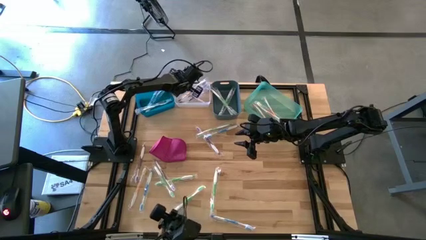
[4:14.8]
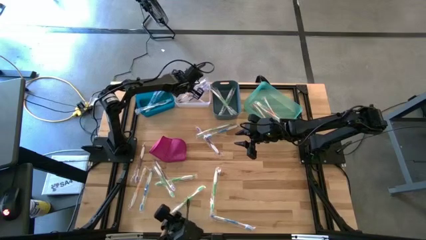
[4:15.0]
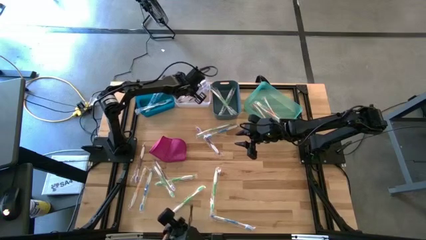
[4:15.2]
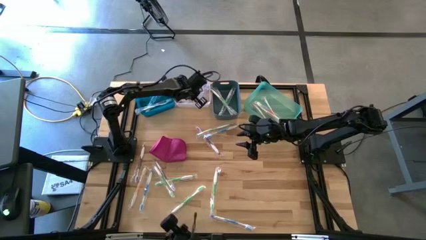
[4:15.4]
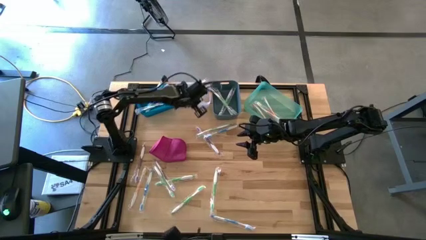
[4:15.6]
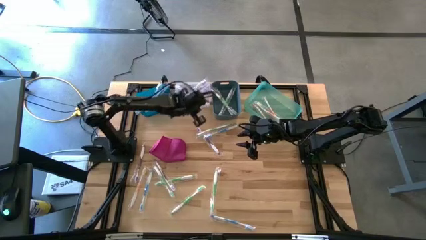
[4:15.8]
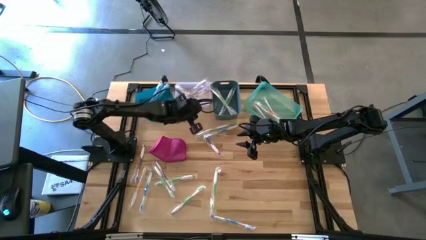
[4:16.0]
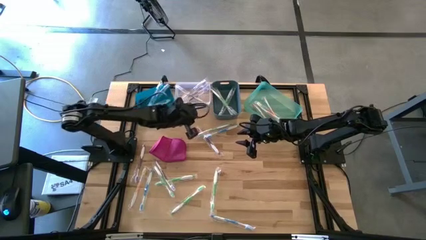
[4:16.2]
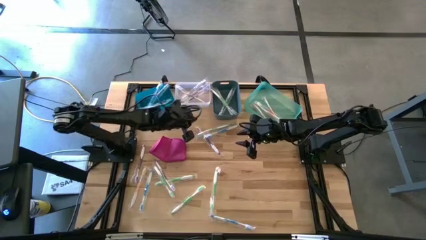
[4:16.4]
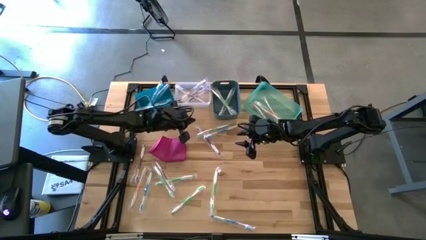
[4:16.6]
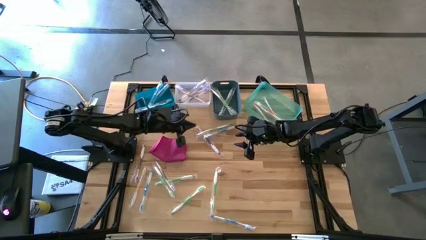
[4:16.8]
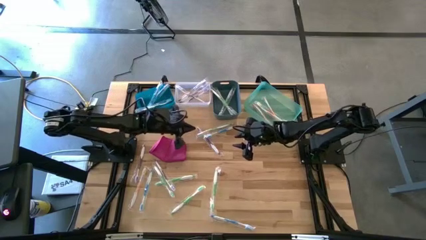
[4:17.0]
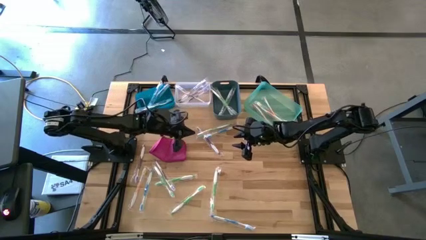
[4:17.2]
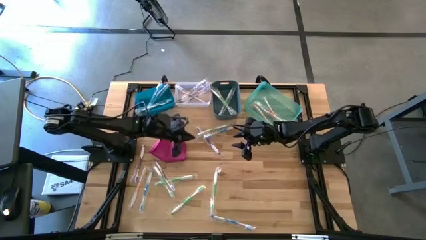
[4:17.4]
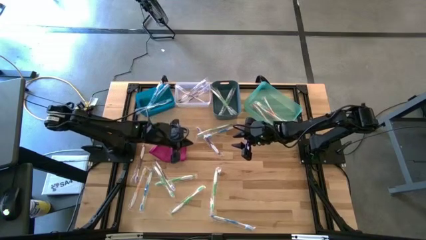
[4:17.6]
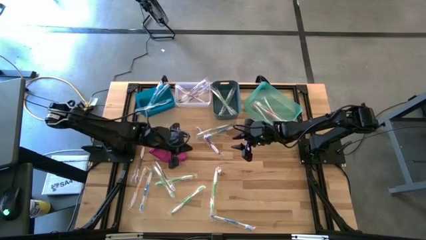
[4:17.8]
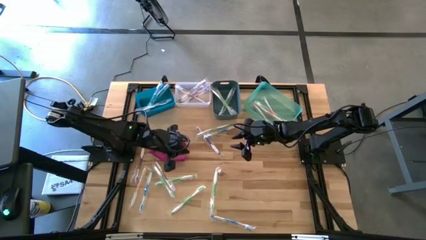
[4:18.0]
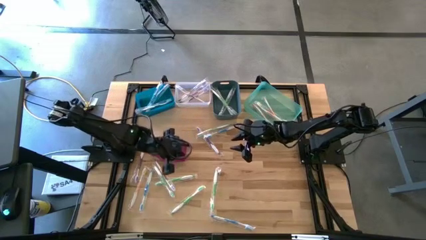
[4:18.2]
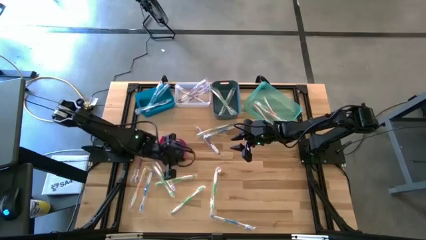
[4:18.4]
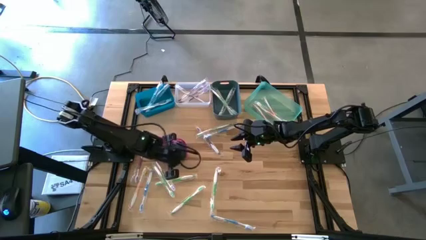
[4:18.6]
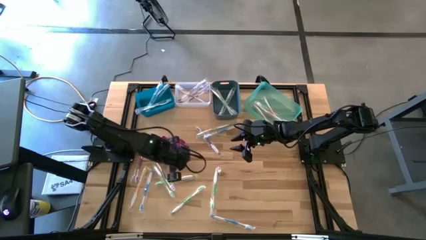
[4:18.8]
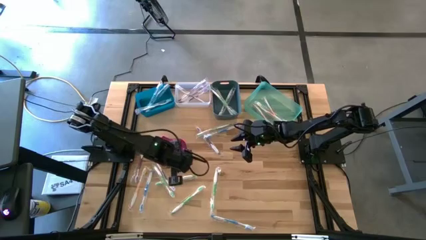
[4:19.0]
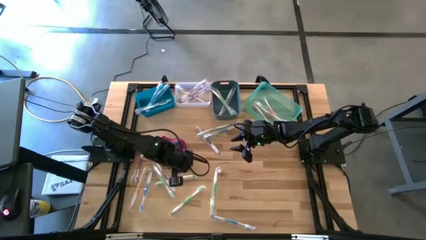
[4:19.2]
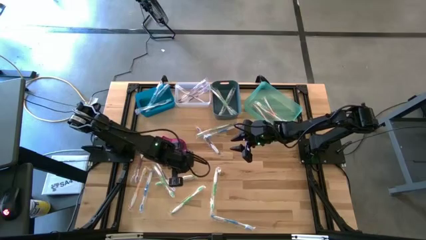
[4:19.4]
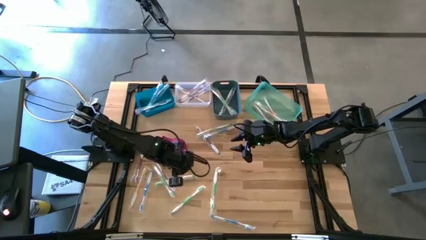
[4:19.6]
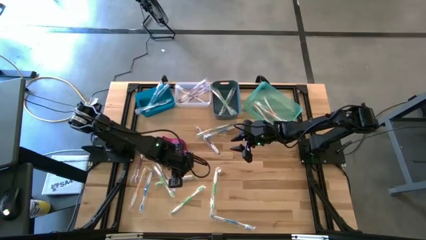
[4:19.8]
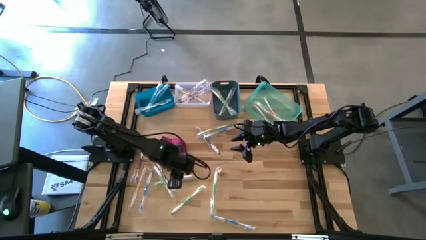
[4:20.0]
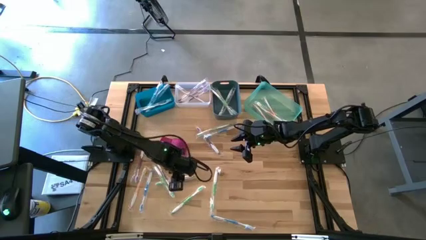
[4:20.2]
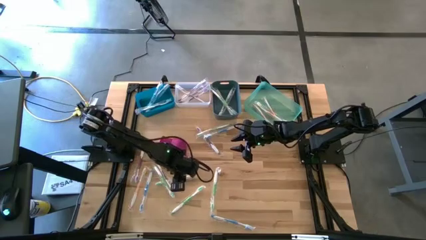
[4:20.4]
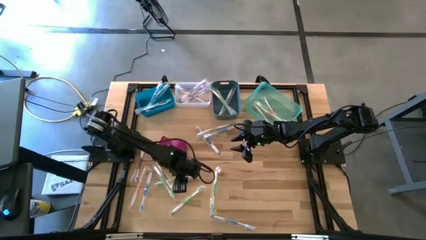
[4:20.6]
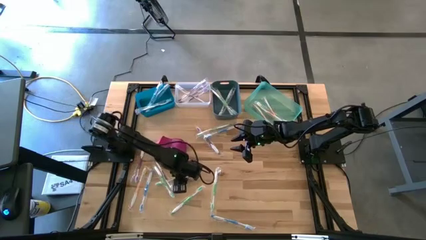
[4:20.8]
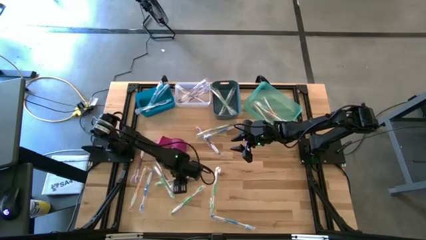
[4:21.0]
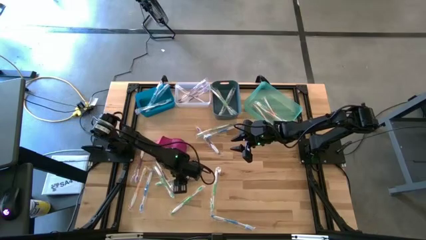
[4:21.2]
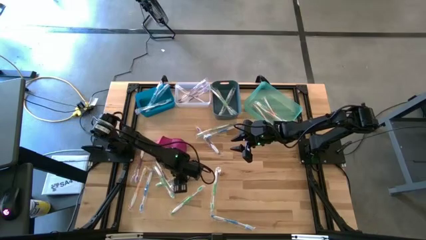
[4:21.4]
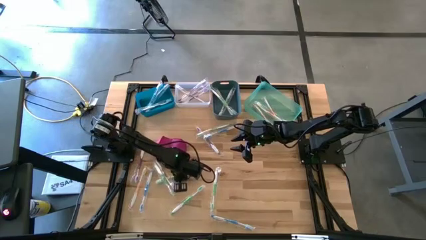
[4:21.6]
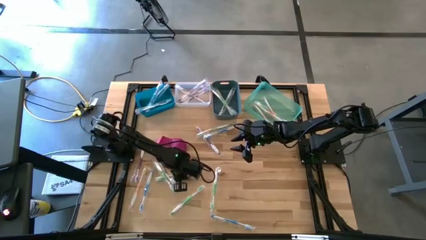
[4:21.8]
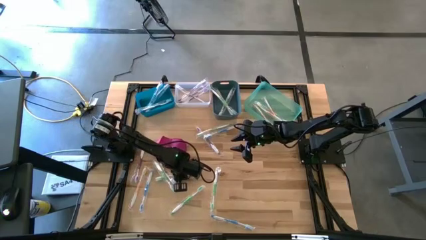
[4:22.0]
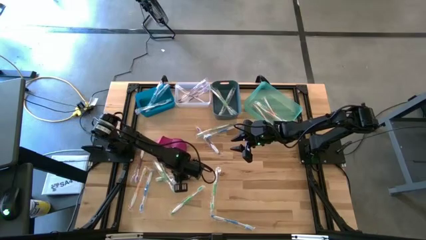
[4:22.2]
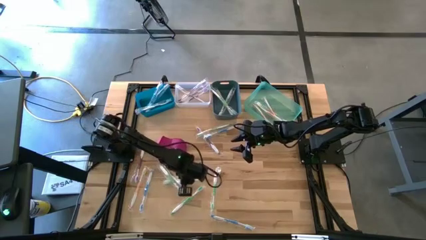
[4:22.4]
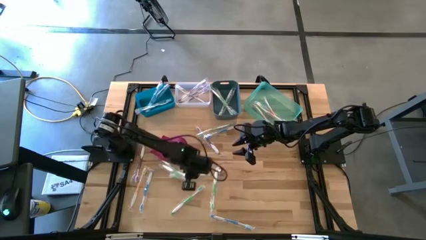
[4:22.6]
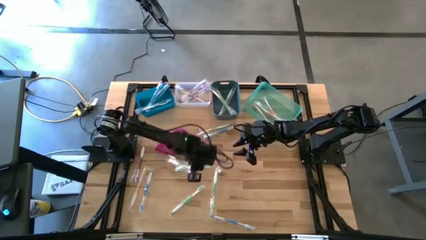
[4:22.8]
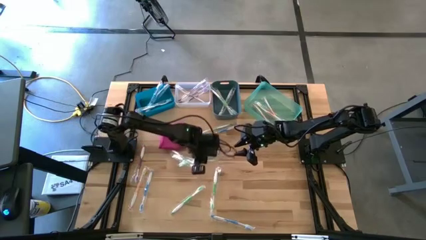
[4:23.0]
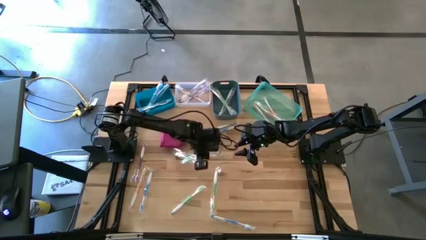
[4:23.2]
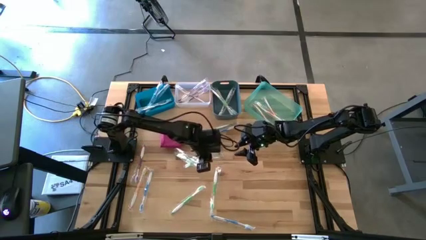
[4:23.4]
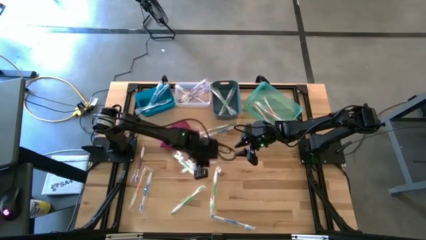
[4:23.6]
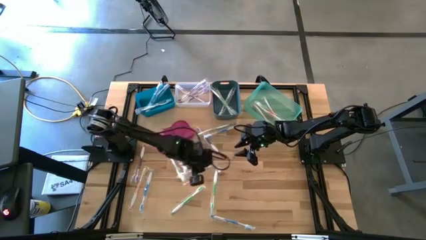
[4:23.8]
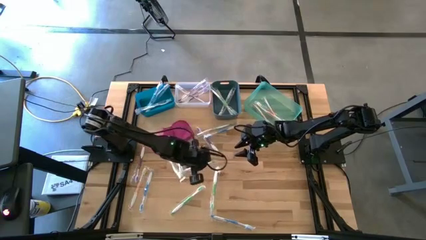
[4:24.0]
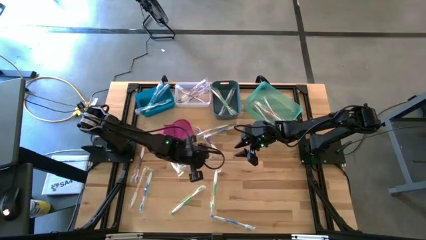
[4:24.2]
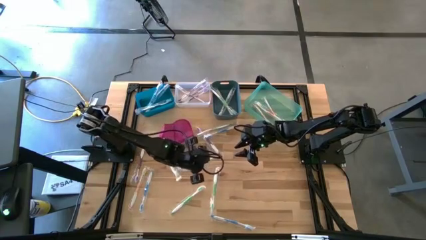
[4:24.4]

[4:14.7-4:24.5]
Task: Pick & Place Toothbrushes
Put the green toothbrush into the dark blue bin

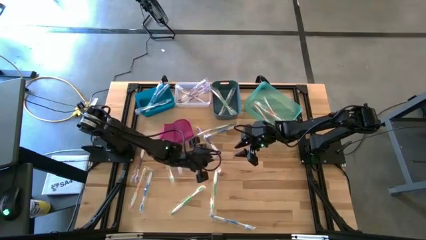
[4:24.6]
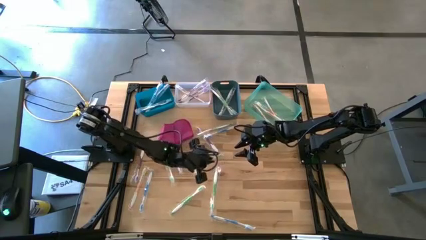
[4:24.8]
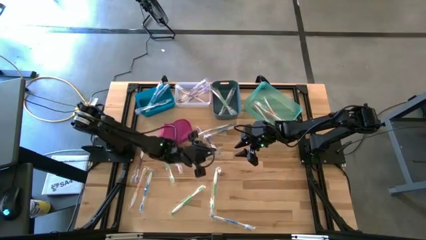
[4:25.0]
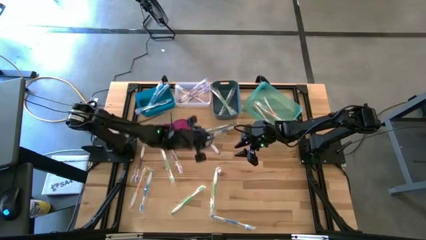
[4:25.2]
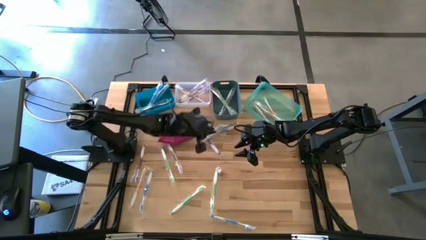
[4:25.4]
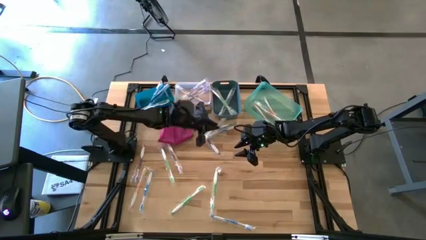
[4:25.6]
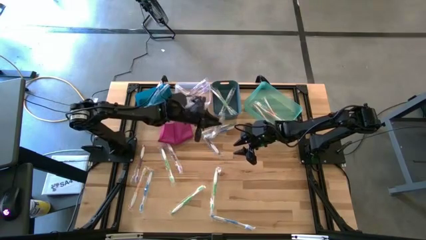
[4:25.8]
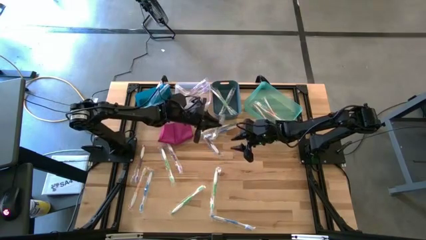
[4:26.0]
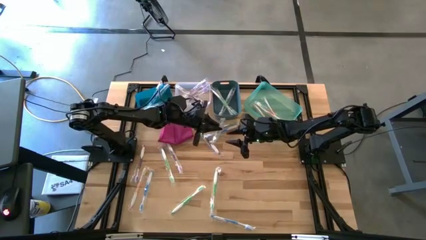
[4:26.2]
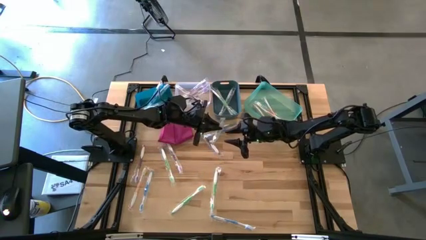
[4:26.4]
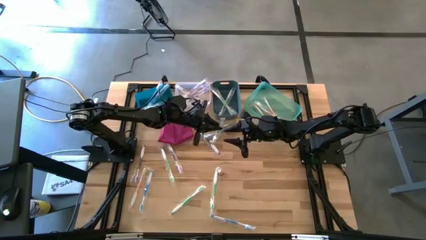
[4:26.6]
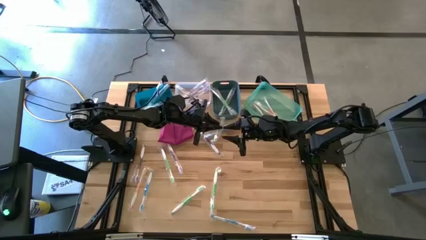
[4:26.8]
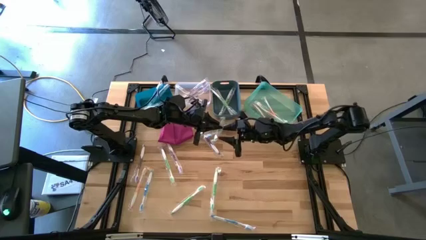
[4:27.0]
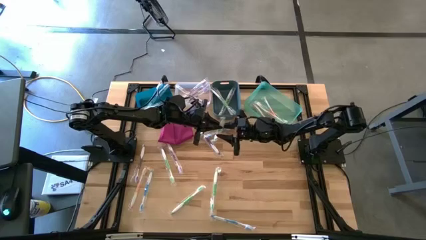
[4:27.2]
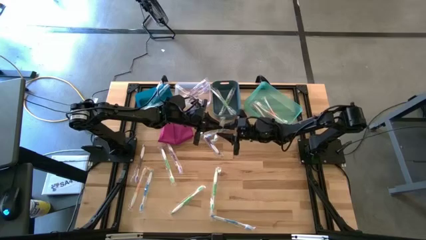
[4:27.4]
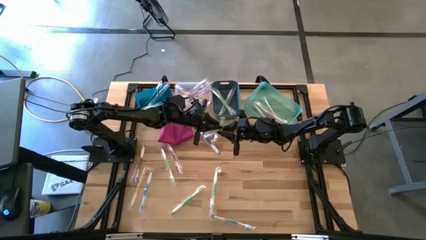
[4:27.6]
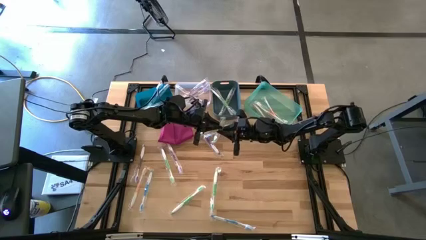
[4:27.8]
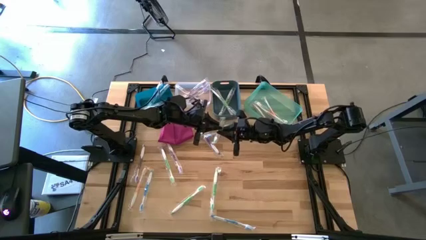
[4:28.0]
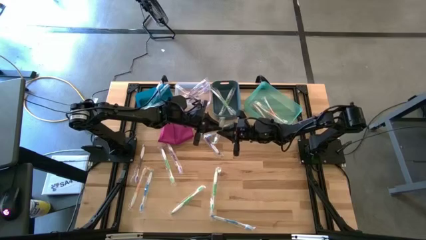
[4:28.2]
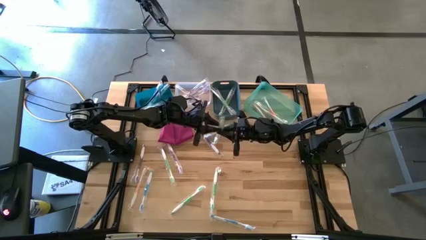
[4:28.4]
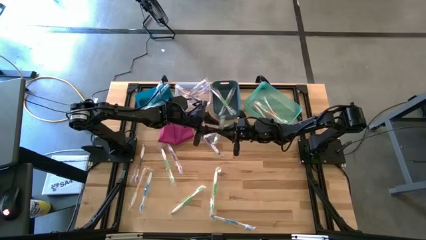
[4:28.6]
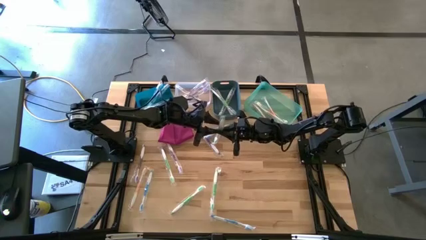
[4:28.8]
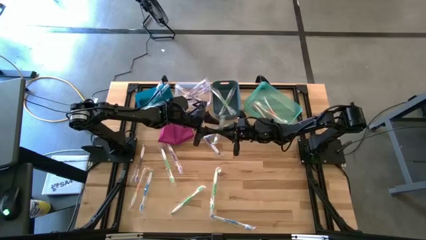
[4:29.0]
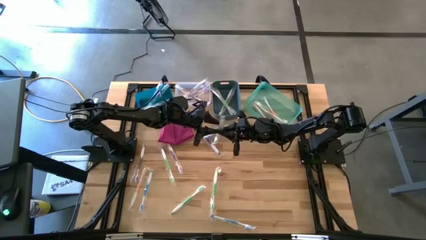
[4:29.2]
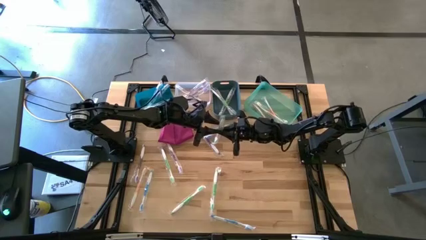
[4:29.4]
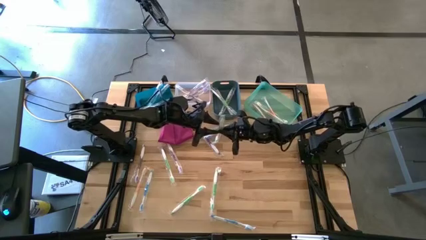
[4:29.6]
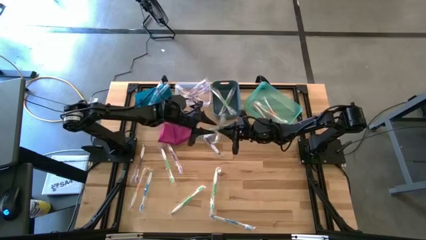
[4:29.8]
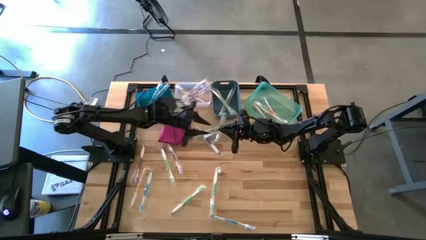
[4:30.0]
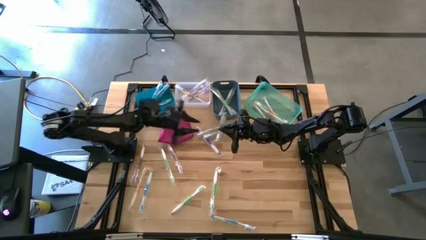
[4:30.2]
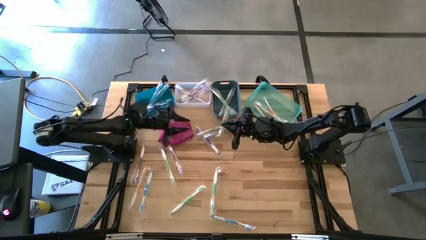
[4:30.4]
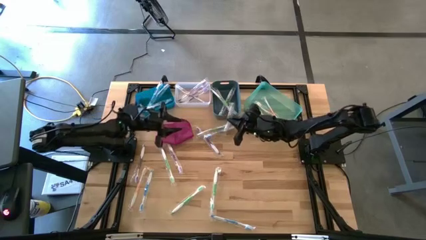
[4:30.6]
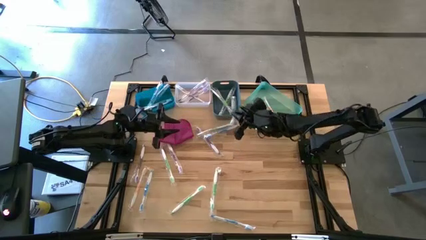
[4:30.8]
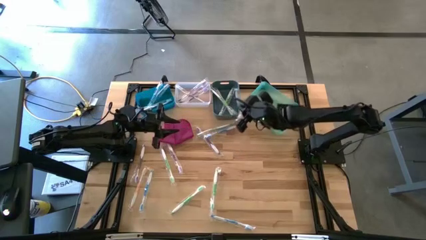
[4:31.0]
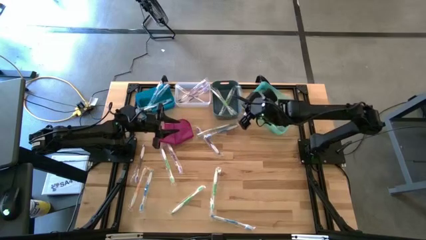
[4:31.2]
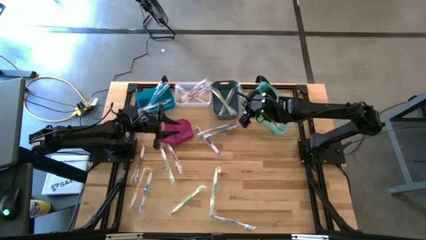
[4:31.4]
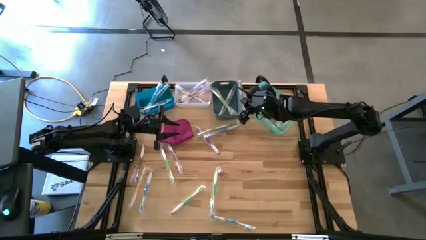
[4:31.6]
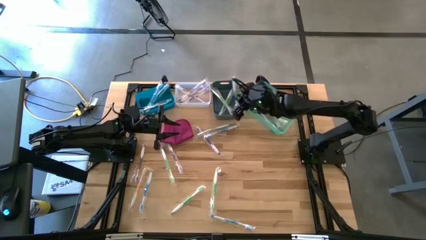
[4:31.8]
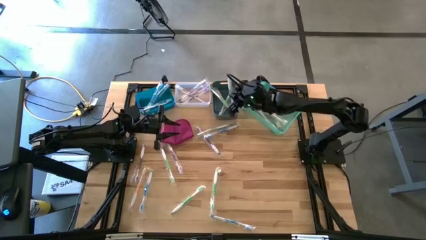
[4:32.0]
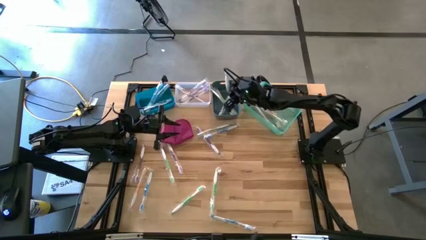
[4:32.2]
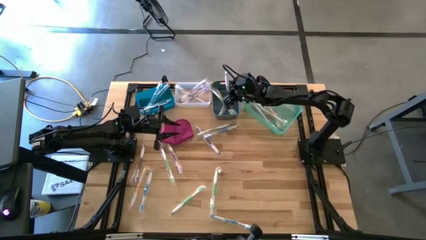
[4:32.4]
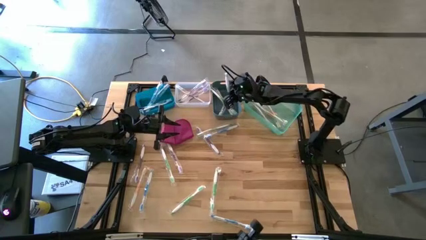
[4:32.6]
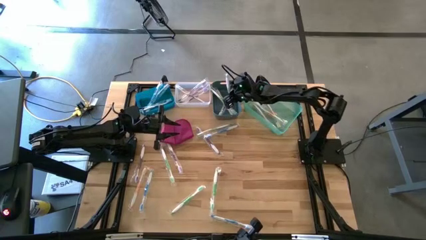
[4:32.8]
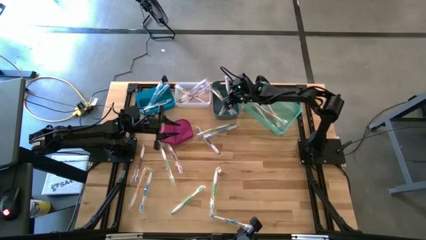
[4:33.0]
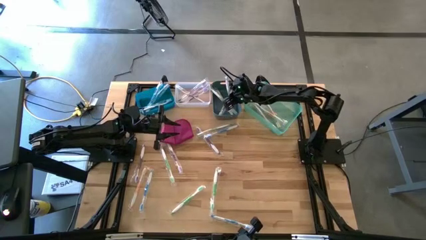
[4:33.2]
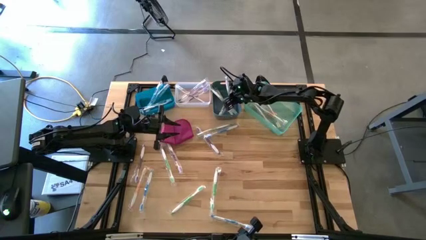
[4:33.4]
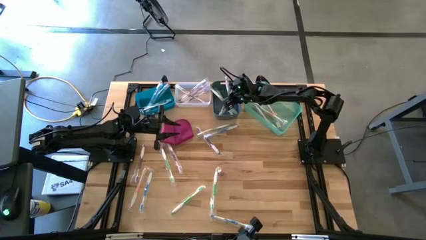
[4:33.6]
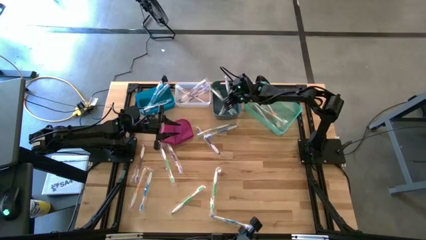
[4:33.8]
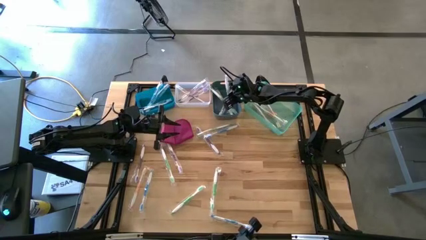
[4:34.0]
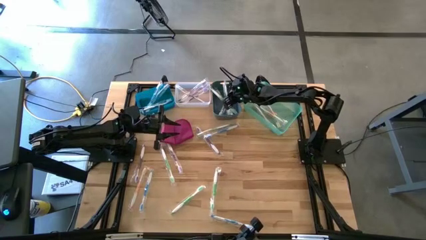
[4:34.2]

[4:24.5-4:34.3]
Put the green toothbrush into the dark blue bin
